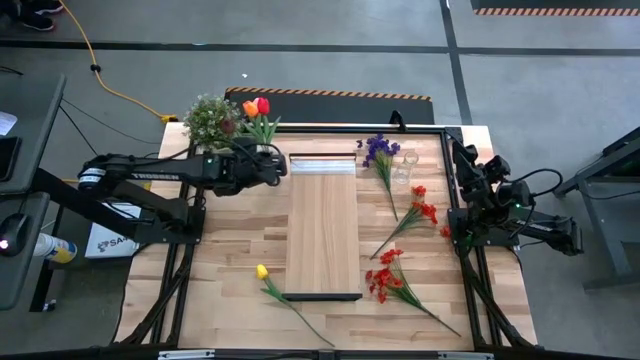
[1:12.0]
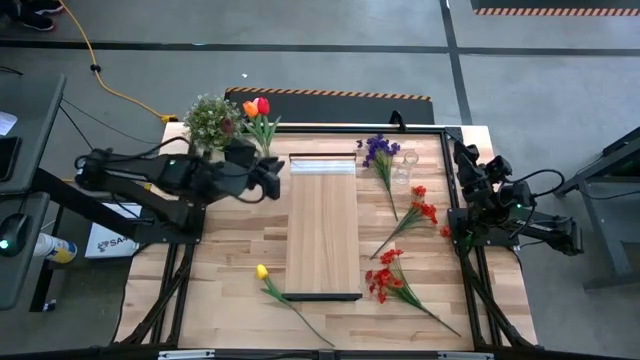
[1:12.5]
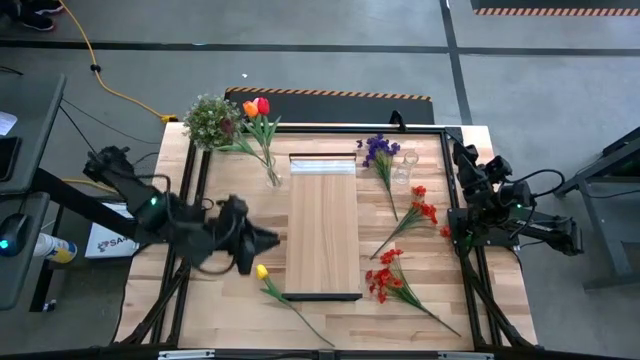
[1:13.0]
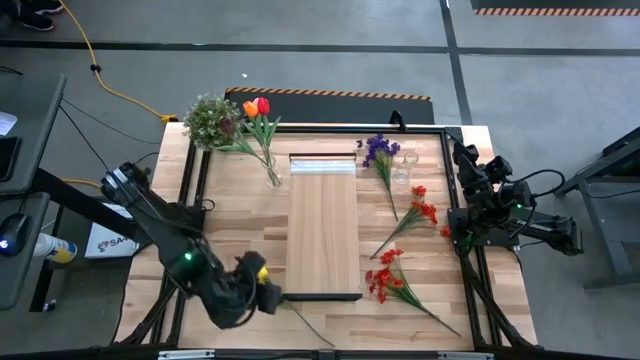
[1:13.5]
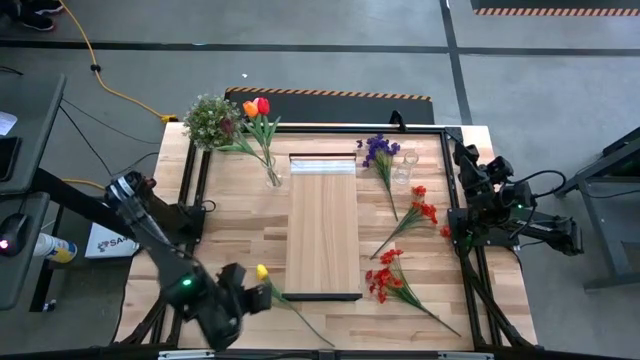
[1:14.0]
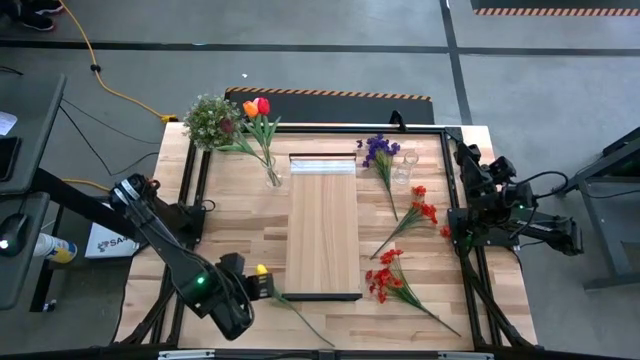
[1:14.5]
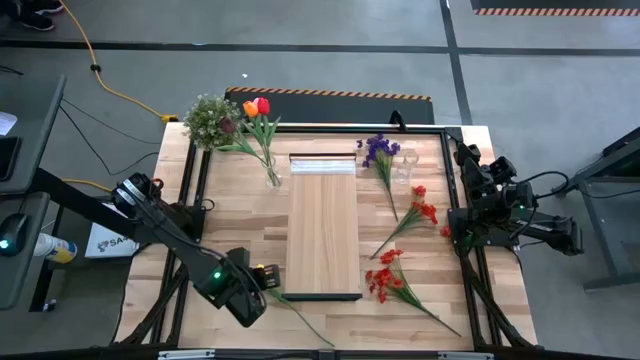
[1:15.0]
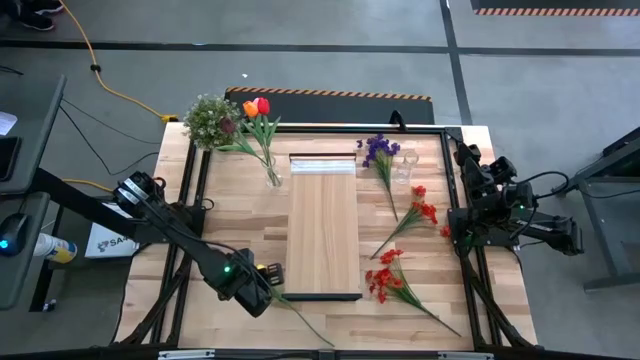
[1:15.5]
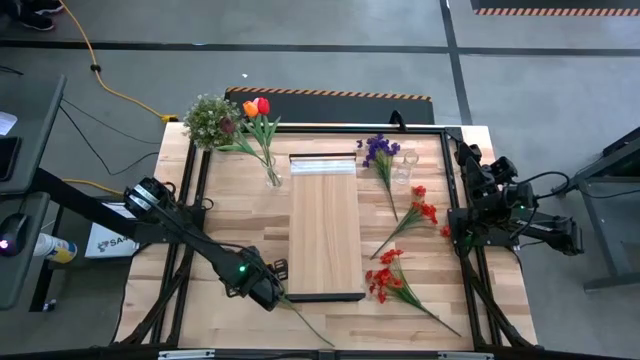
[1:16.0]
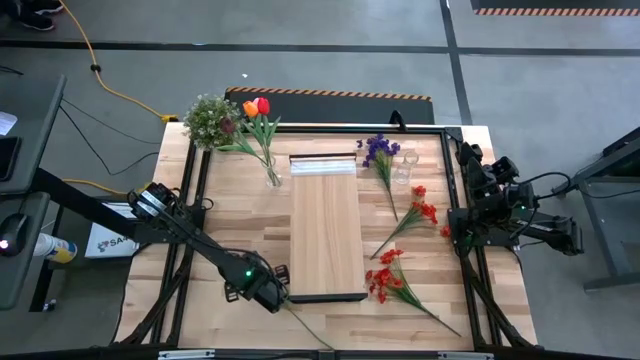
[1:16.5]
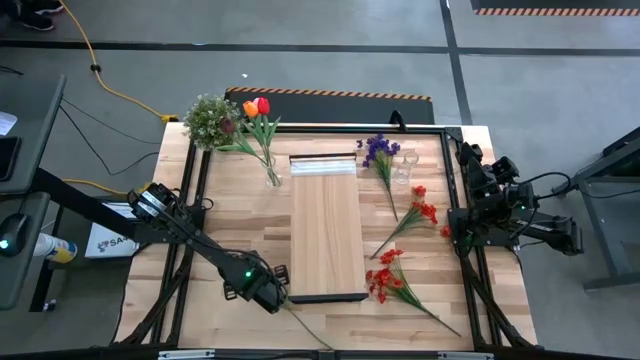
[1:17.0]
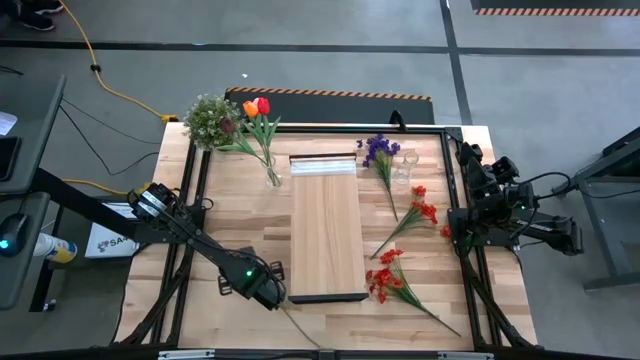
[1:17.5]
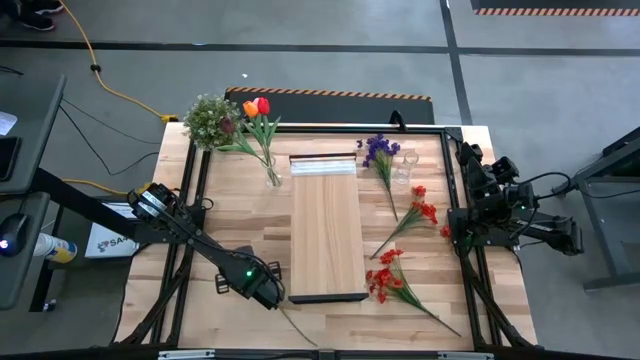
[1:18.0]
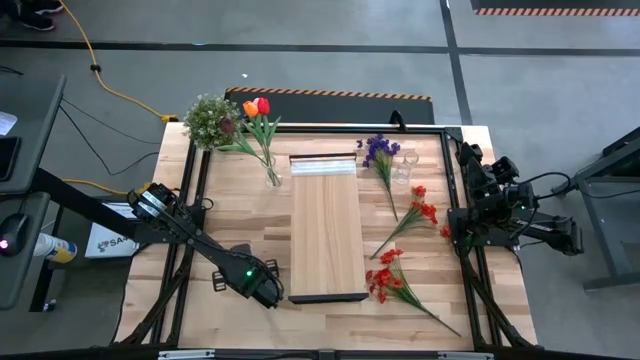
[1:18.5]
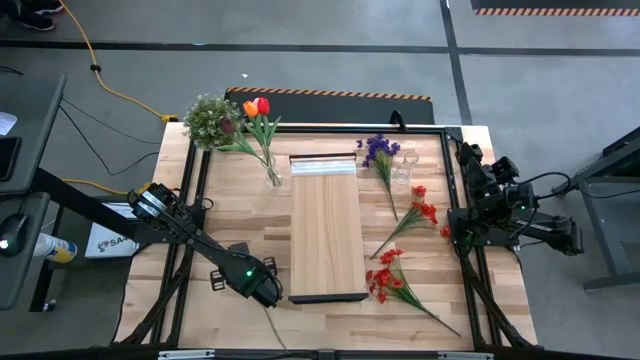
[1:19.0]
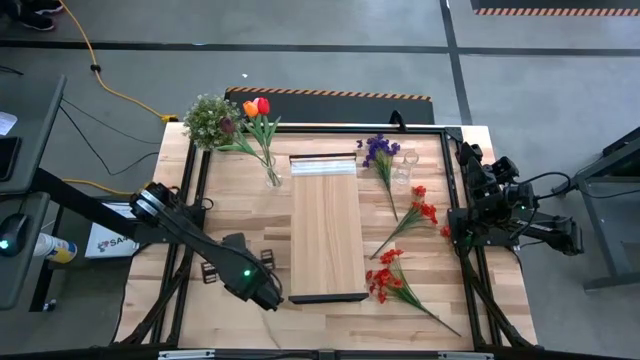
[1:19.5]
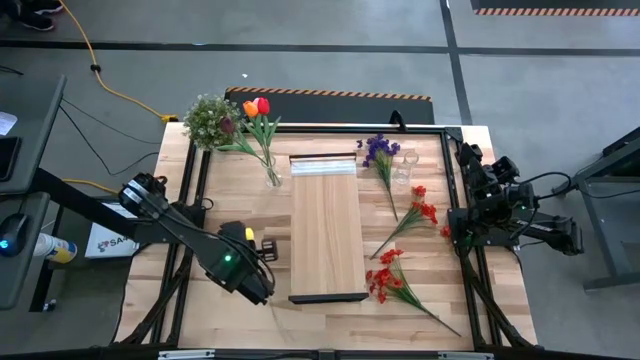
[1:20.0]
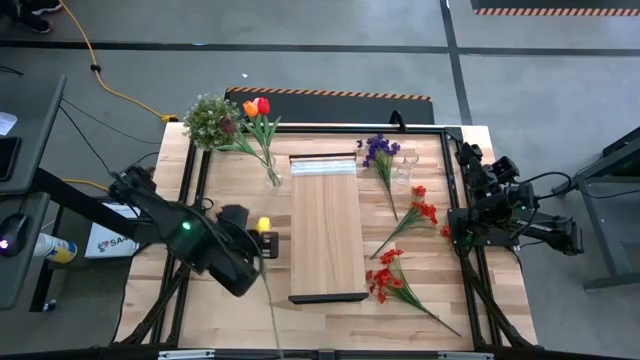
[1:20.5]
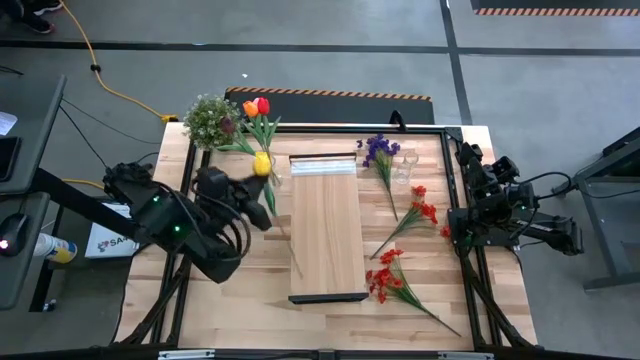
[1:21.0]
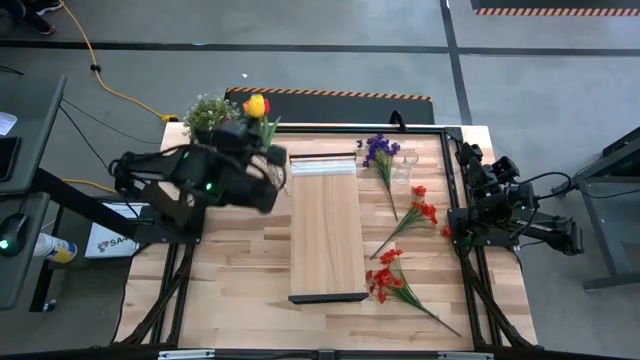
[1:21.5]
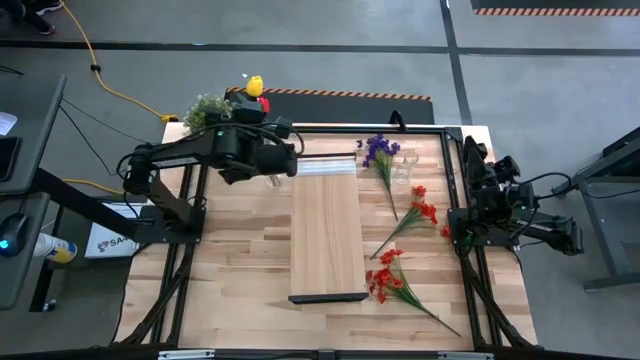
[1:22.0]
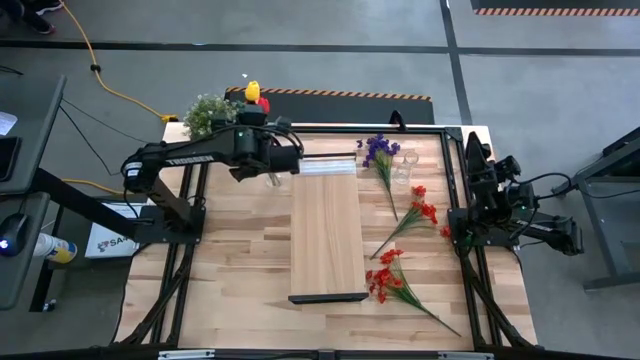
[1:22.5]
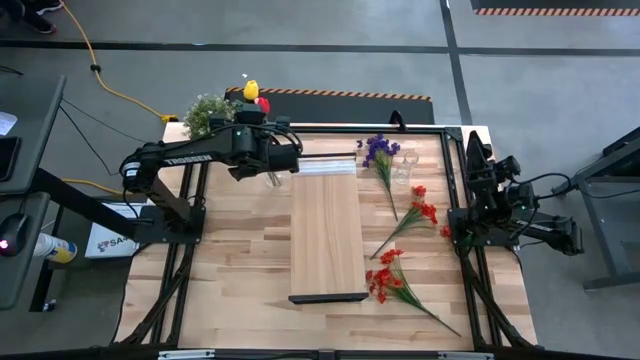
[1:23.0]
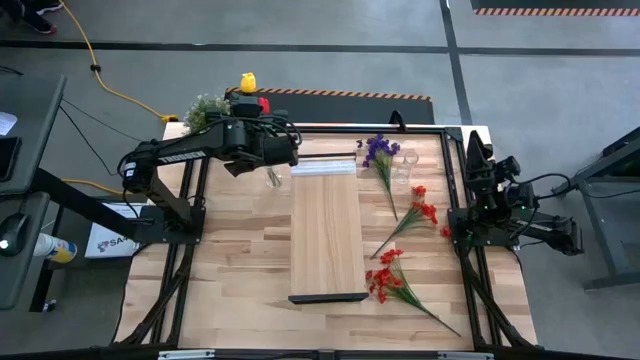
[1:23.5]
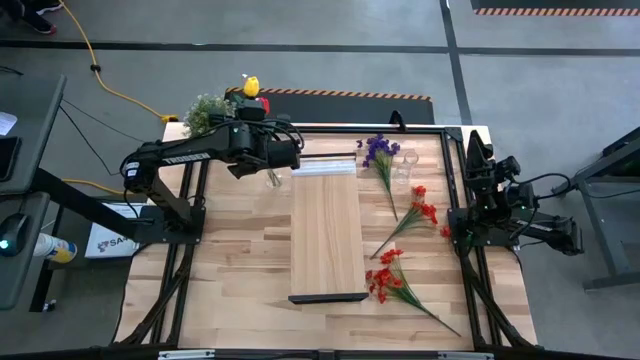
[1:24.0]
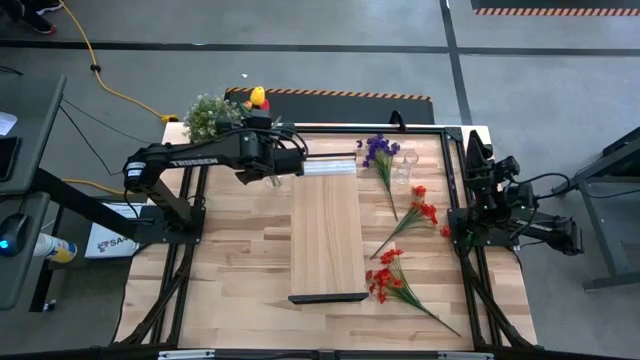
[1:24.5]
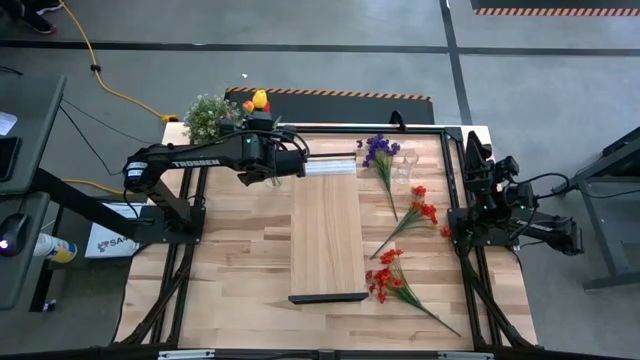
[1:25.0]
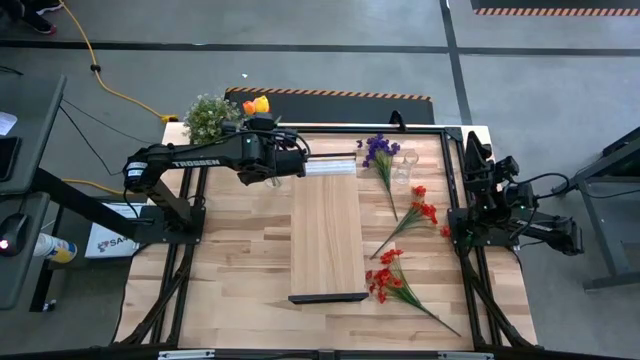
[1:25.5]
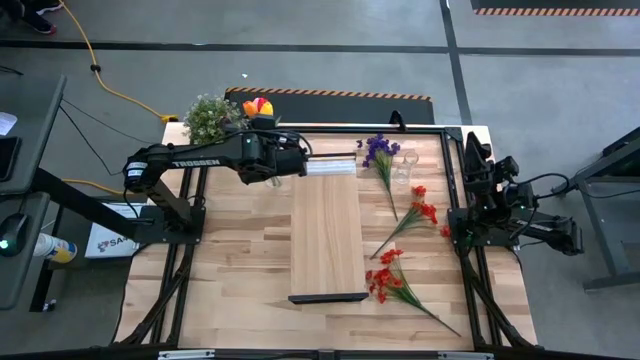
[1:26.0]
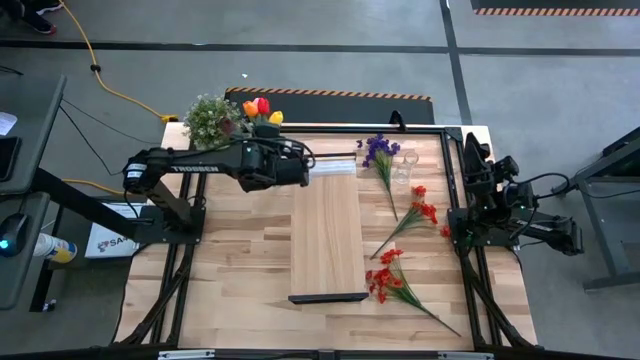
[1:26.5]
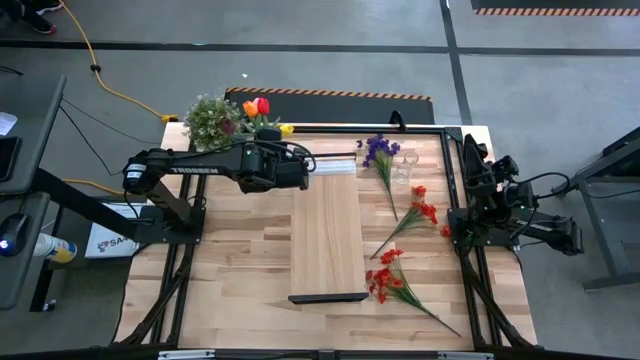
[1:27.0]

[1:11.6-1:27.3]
Task: Pick and place flowers into a vace then onto a shelf
Put the yellow flower into the left transparent vase

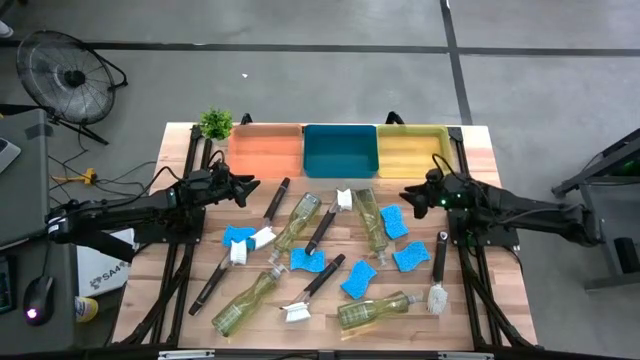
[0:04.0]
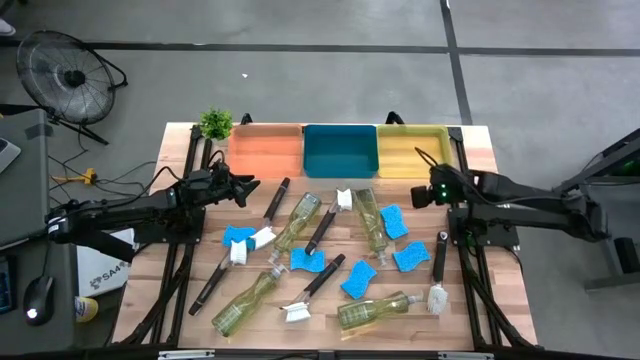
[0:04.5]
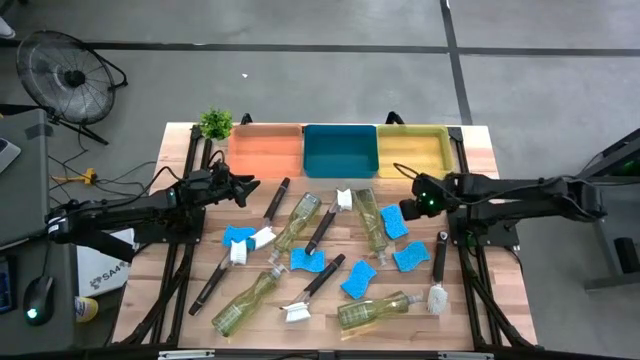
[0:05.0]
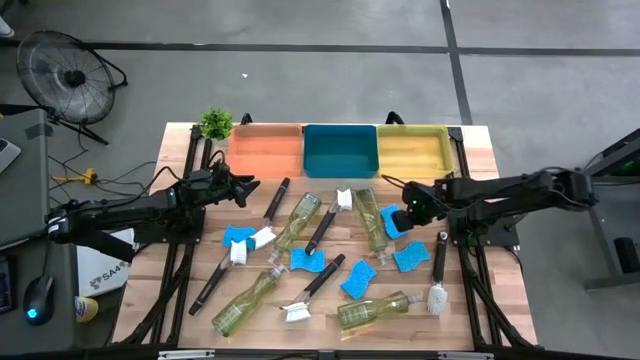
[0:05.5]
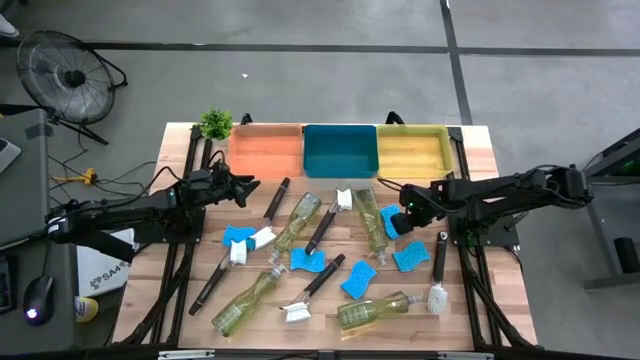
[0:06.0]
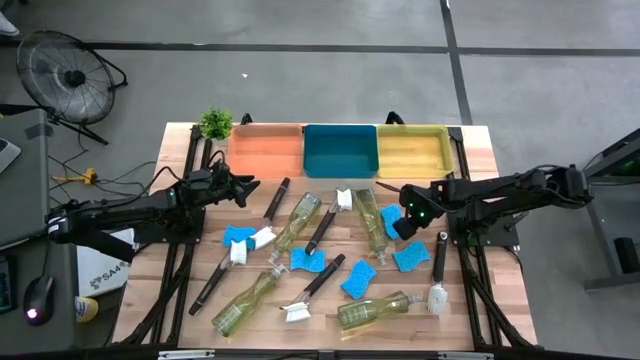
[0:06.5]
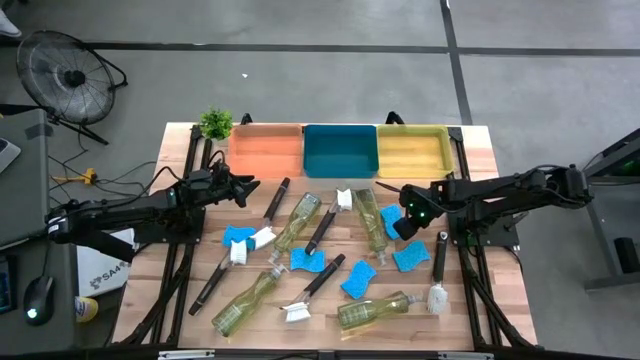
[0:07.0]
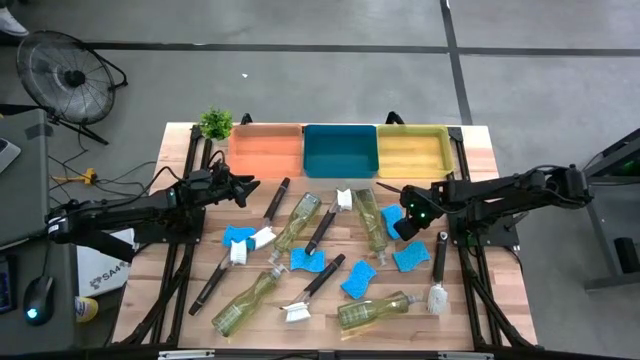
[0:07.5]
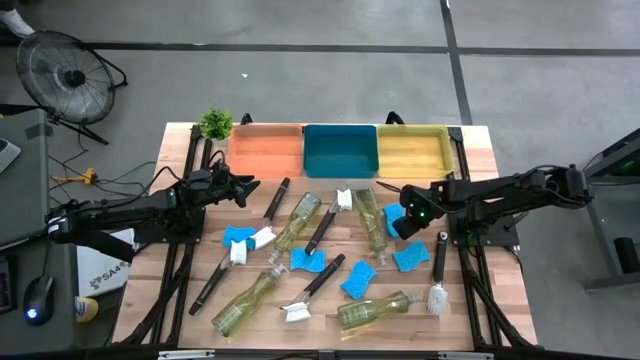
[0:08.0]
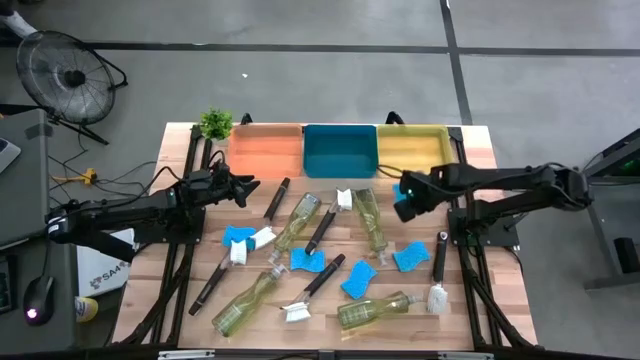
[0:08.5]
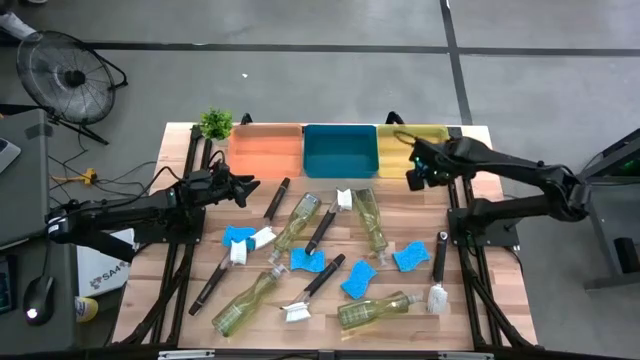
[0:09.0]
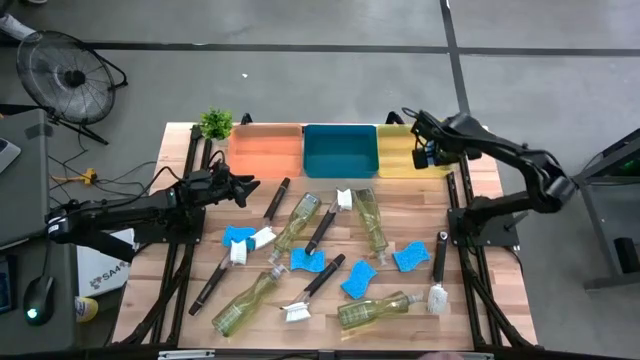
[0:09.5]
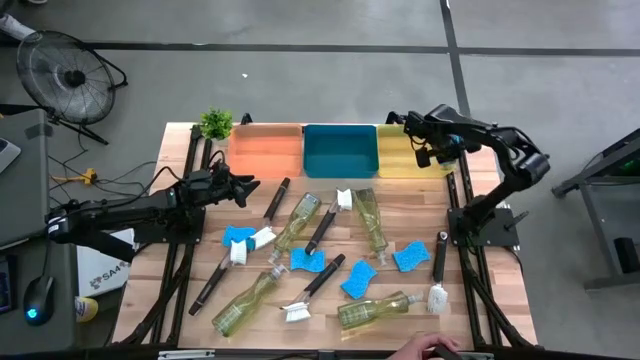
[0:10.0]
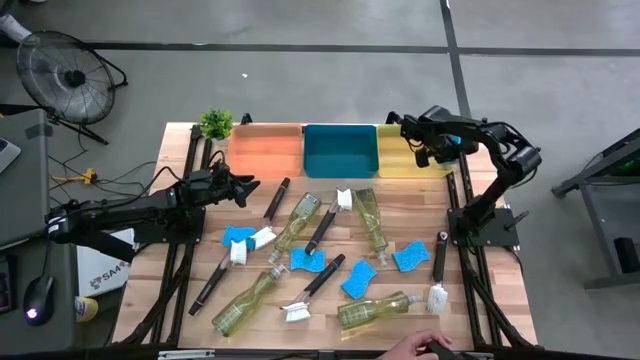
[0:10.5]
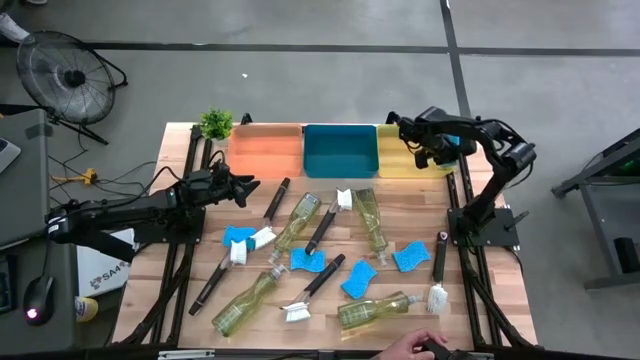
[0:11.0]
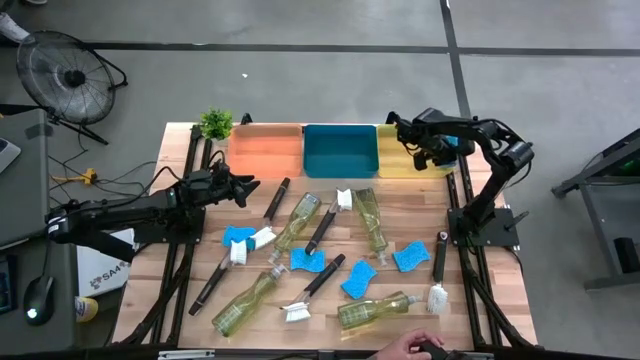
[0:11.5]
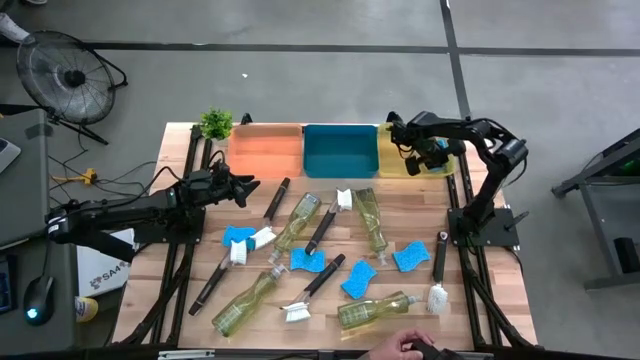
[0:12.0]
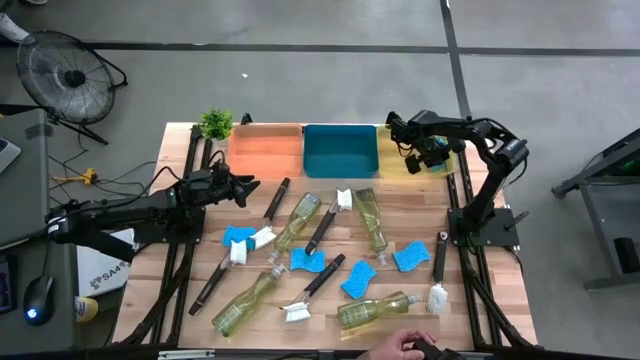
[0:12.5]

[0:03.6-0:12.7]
Task: Pick & Place Kitchen Sink Supplies
Put the blue sponge into the yellow bin
